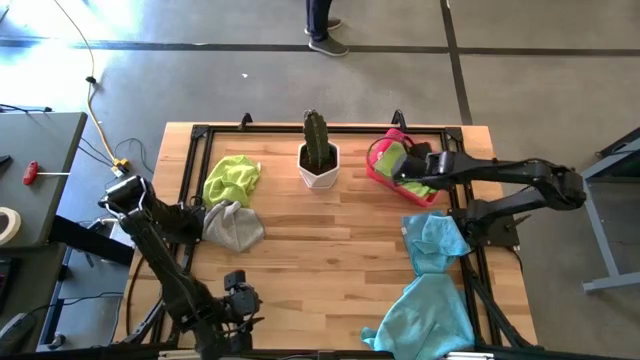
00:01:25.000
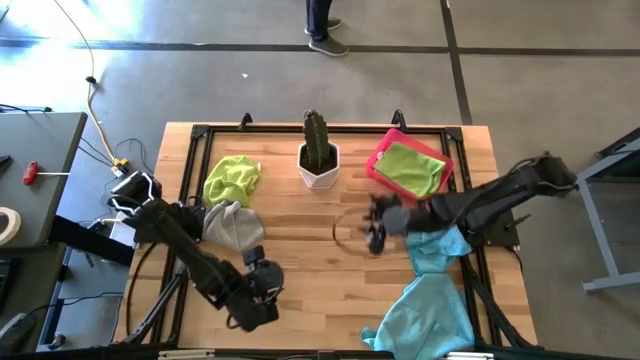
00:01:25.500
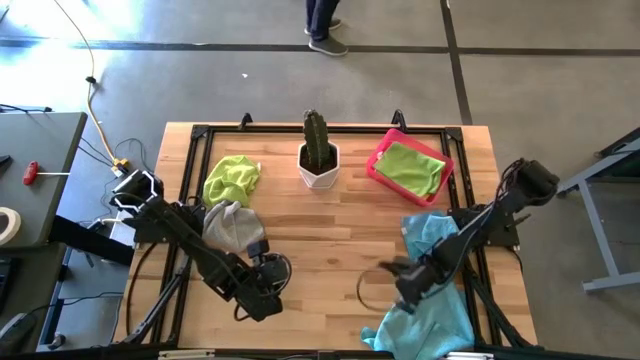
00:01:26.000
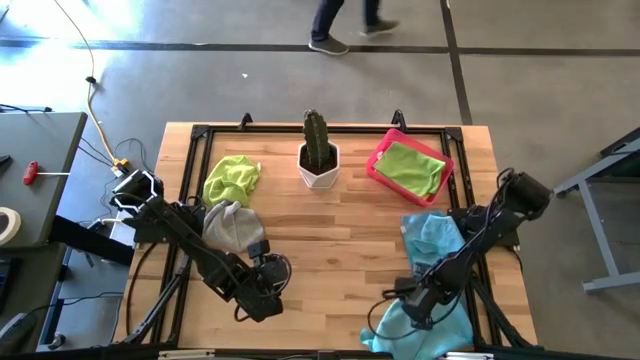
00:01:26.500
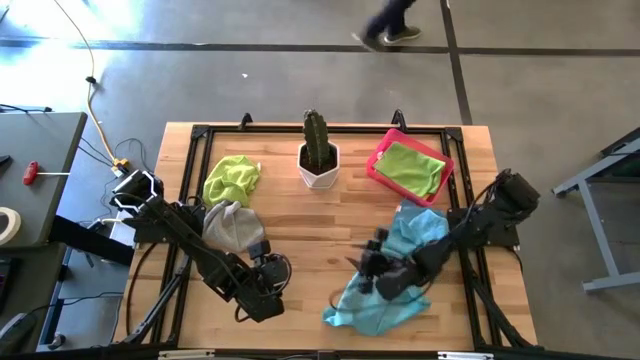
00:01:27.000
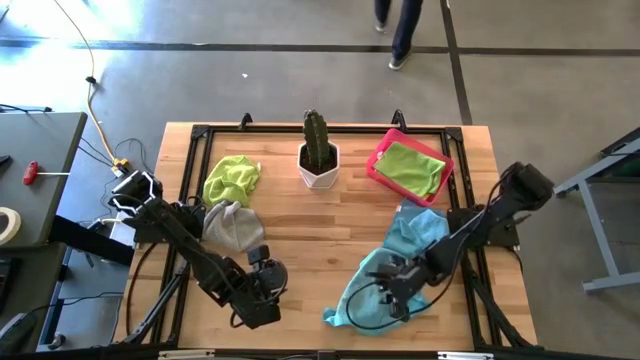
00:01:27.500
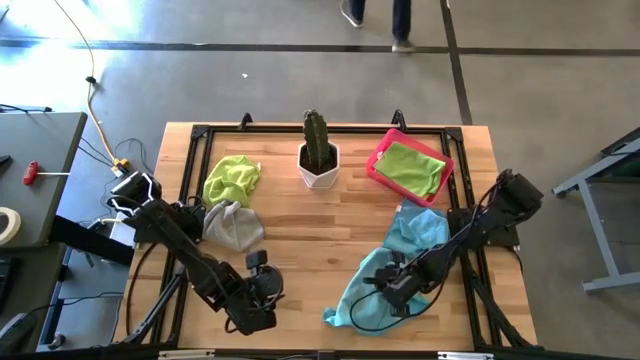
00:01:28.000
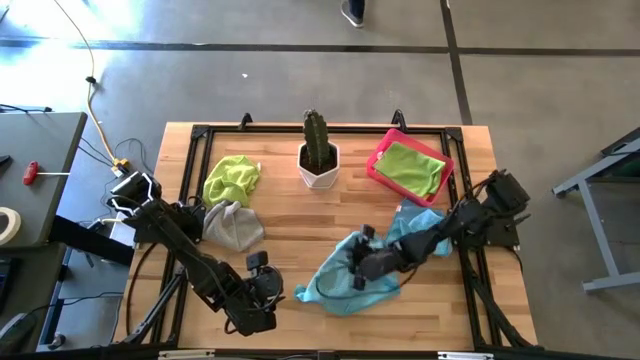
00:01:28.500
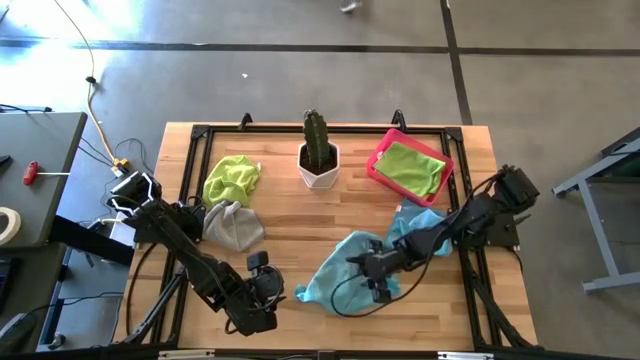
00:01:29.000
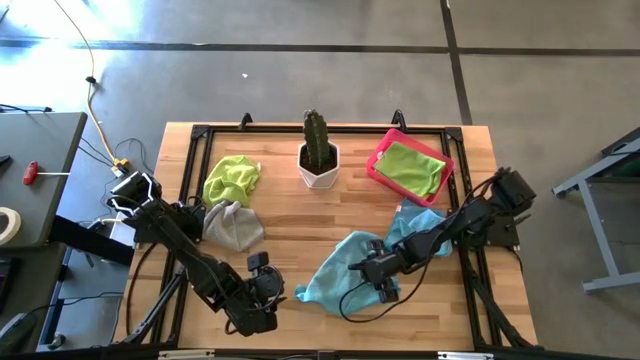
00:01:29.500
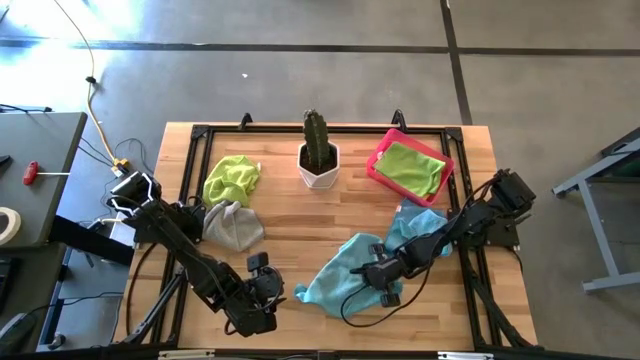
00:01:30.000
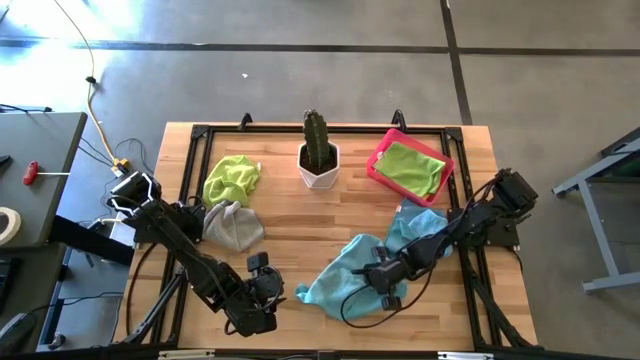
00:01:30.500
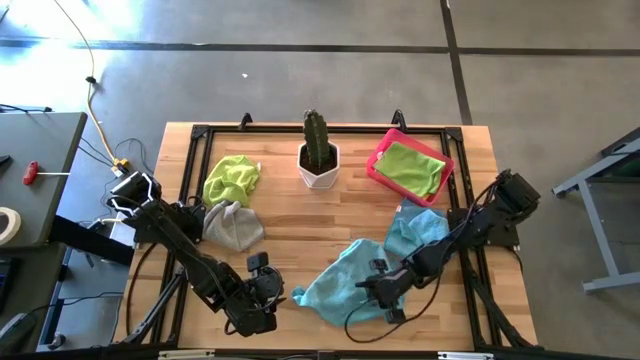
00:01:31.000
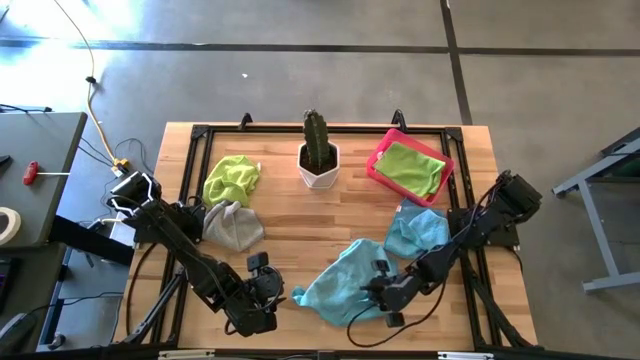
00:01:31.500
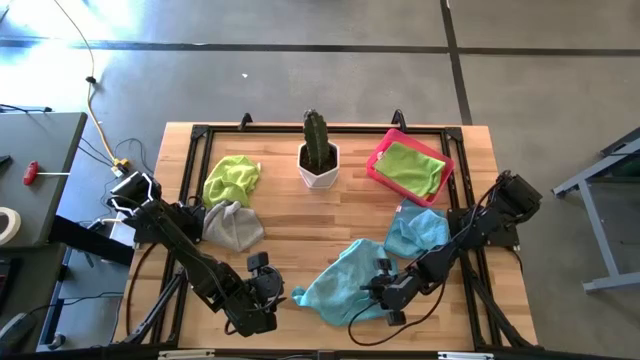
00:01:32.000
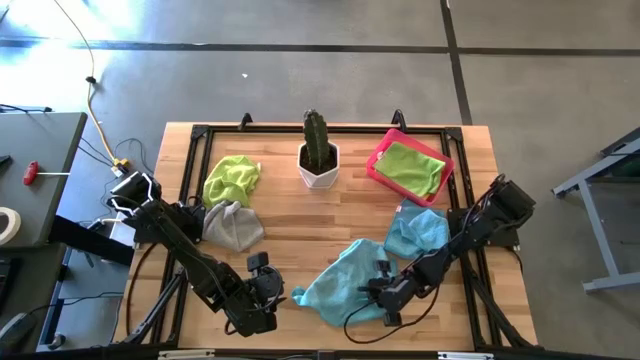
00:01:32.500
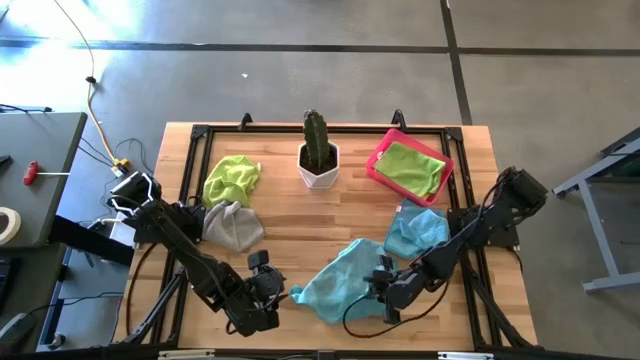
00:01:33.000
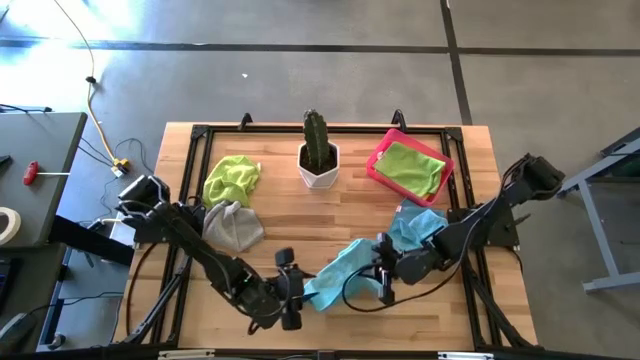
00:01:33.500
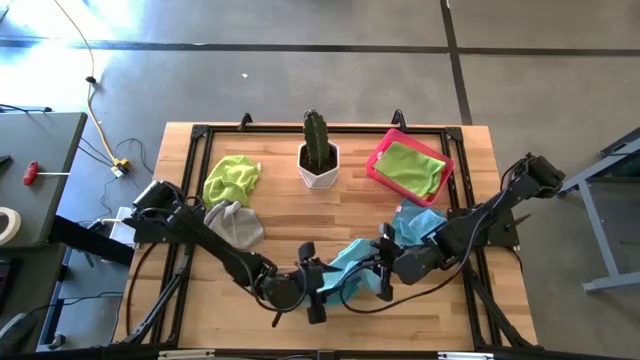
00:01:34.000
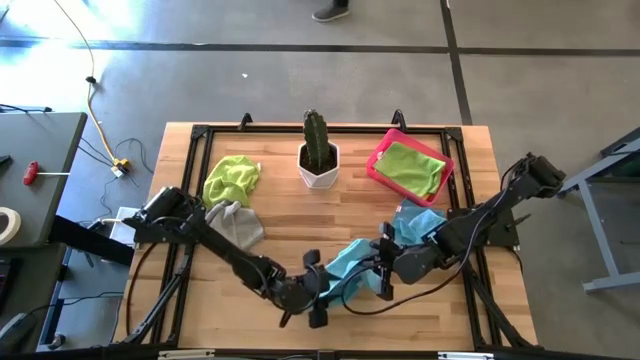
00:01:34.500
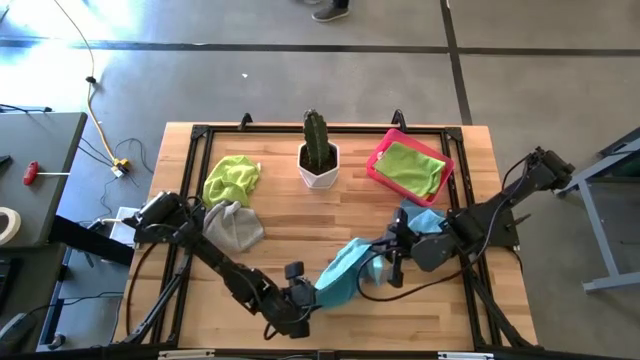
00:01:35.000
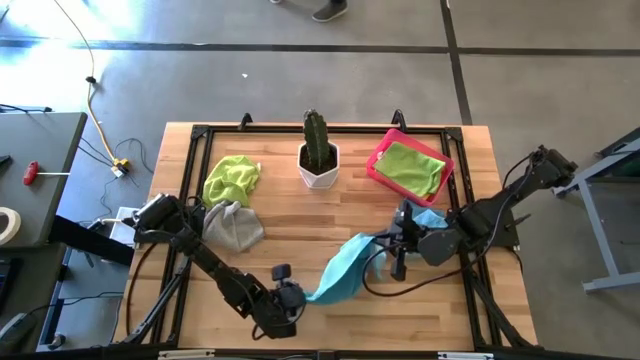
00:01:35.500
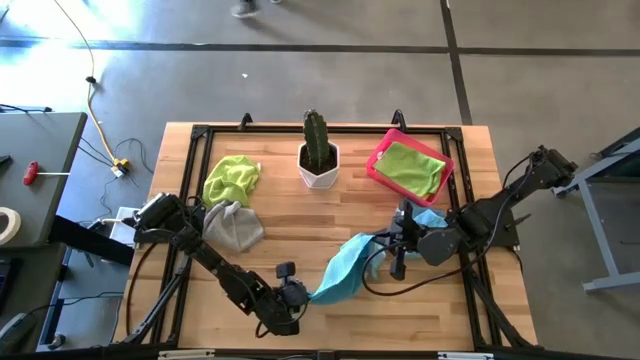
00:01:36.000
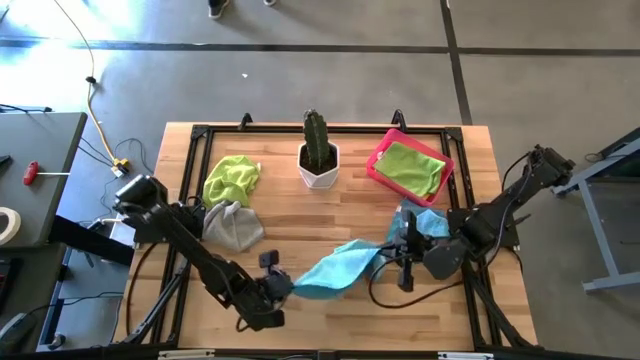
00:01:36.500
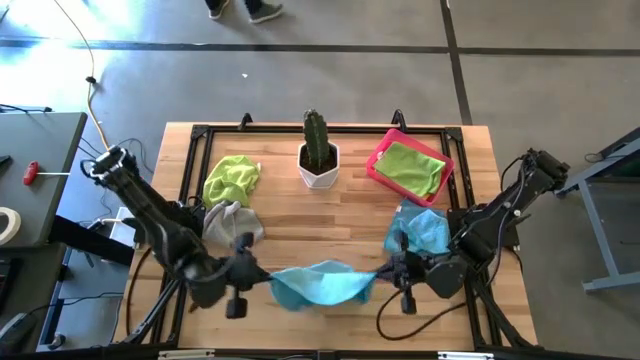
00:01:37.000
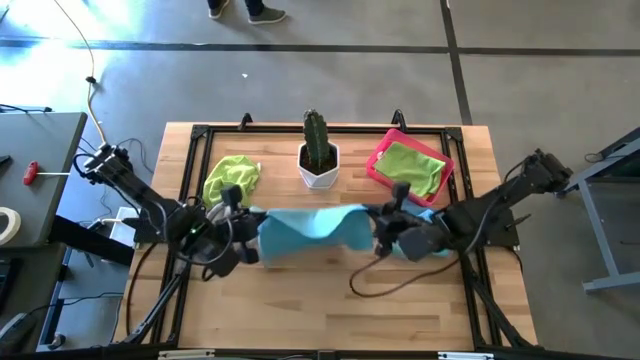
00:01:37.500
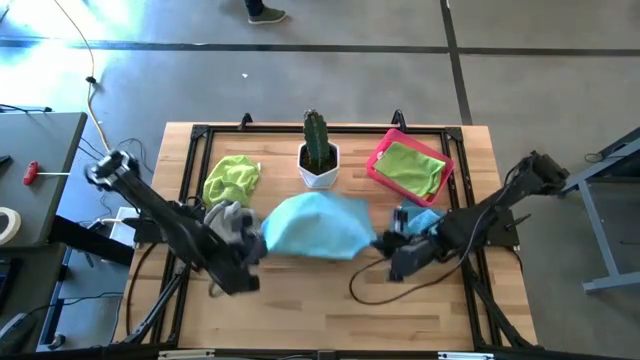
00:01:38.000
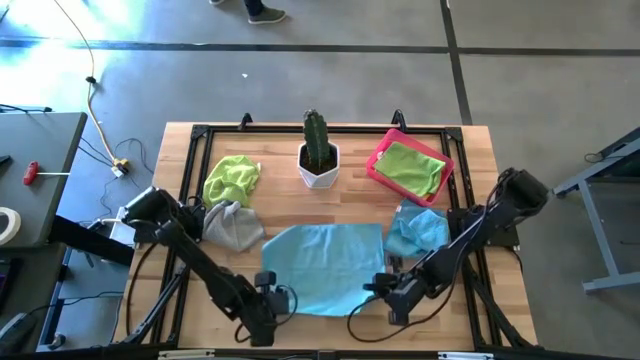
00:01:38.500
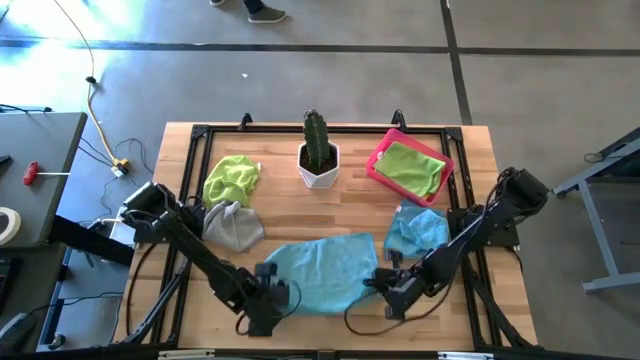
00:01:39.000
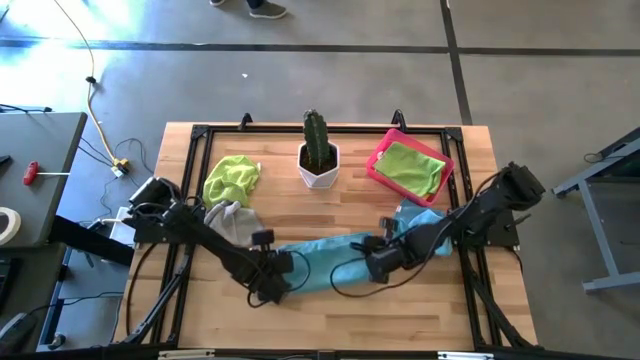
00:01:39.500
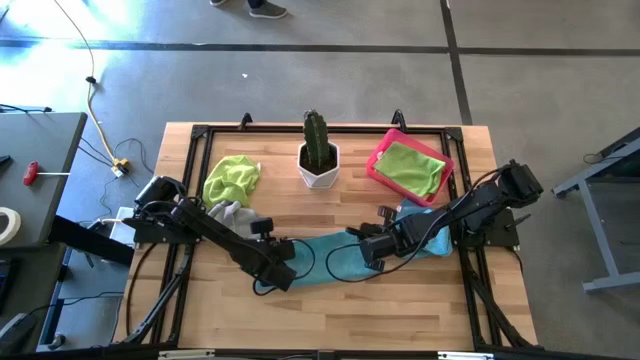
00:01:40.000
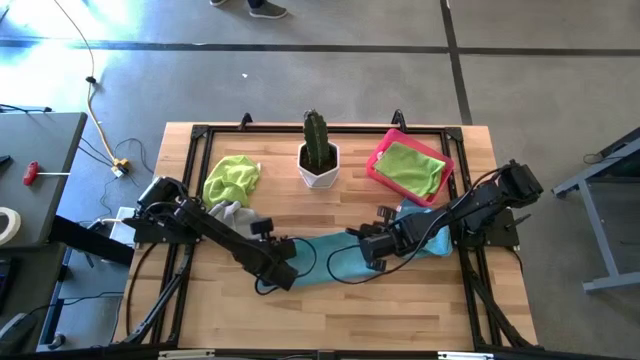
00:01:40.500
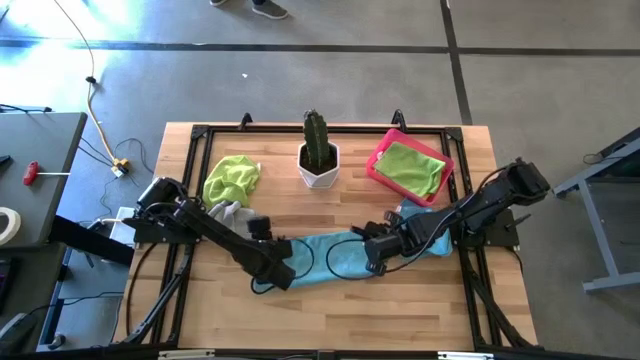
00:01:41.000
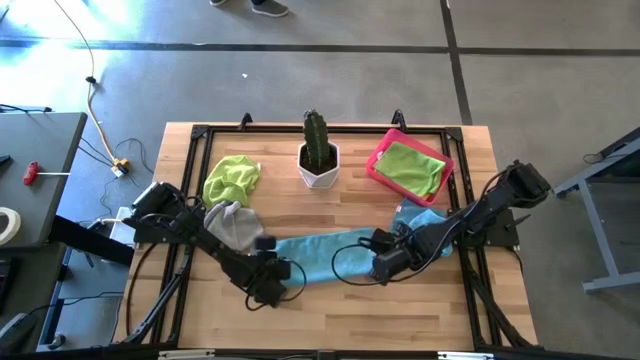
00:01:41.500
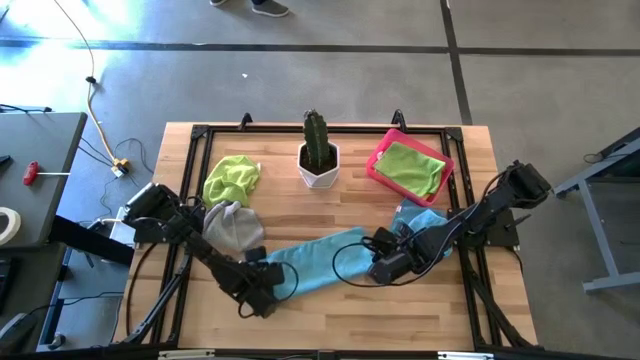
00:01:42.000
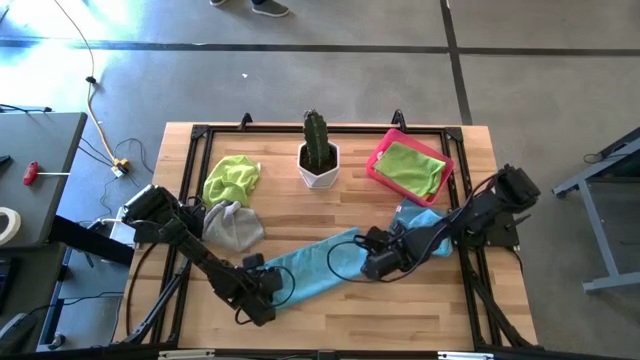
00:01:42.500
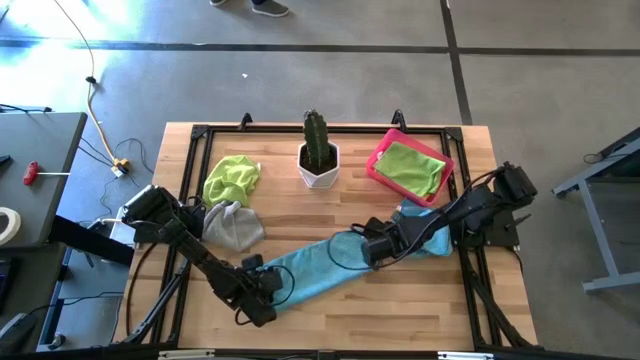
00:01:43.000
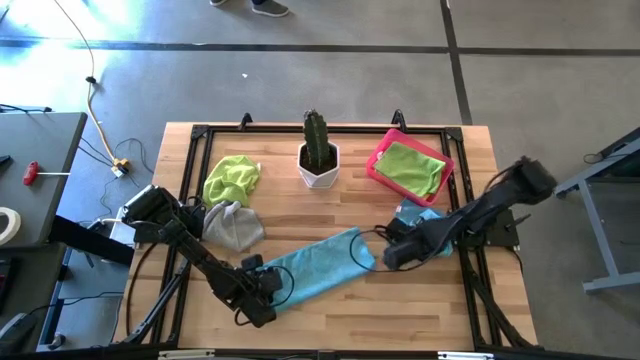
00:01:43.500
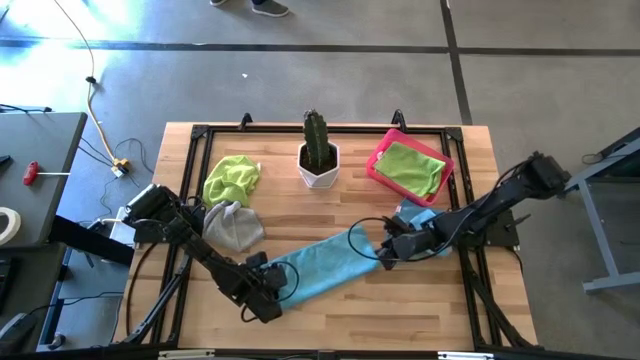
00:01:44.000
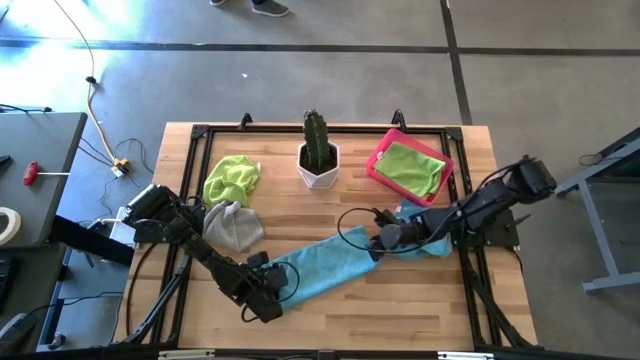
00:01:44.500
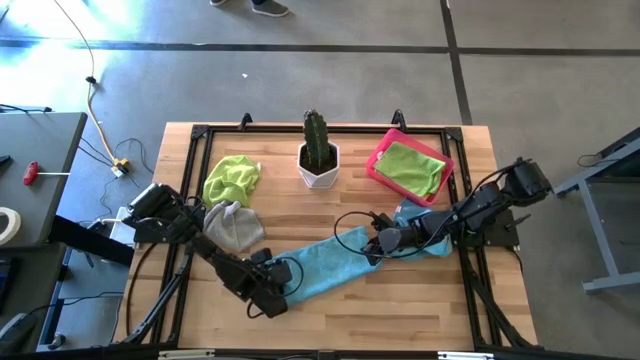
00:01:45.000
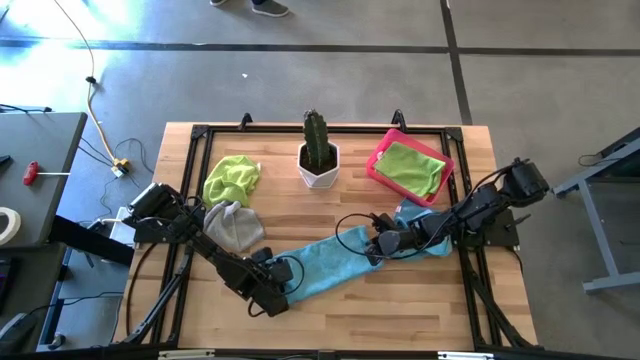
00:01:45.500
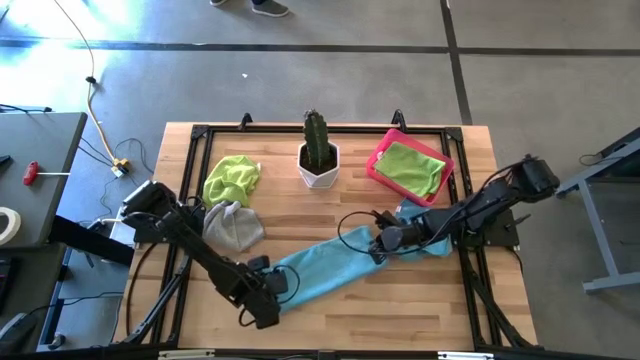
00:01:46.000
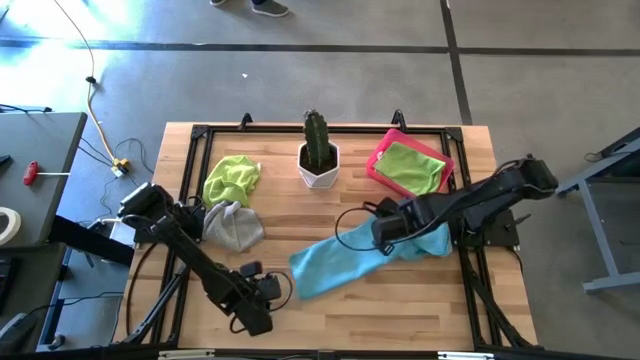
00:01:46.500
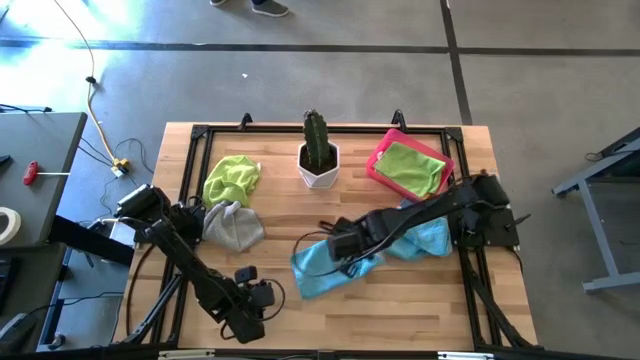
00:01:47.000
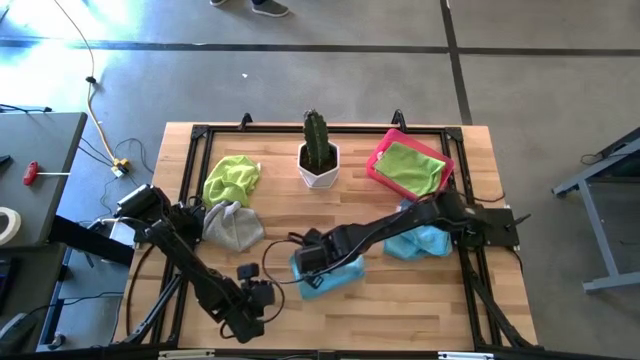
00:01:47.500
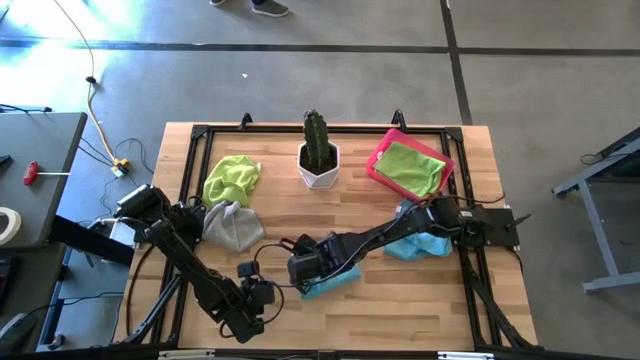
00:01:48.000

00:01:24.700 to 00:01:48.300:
Task: Fold microfiber towels
Fold the bottom blue microfiber towel
